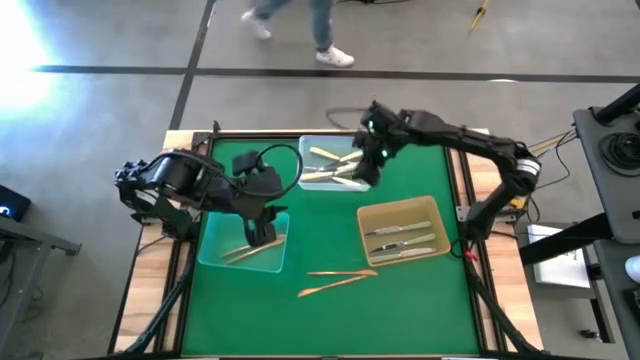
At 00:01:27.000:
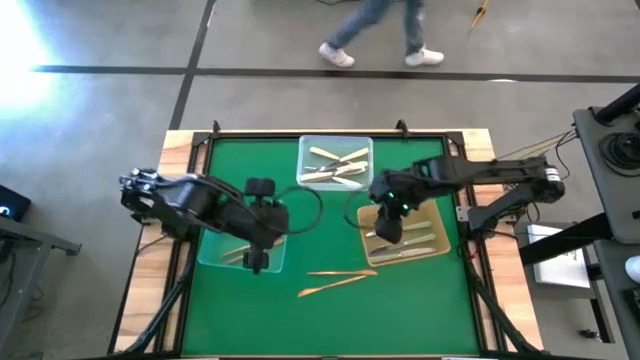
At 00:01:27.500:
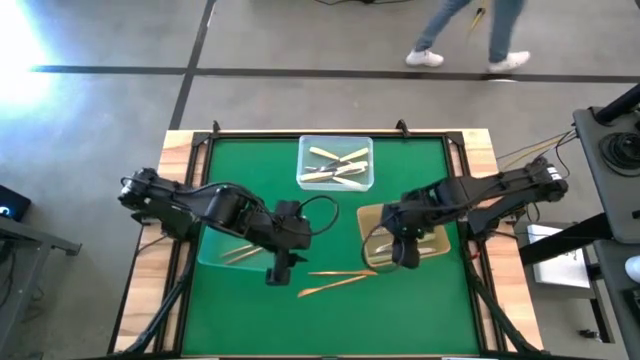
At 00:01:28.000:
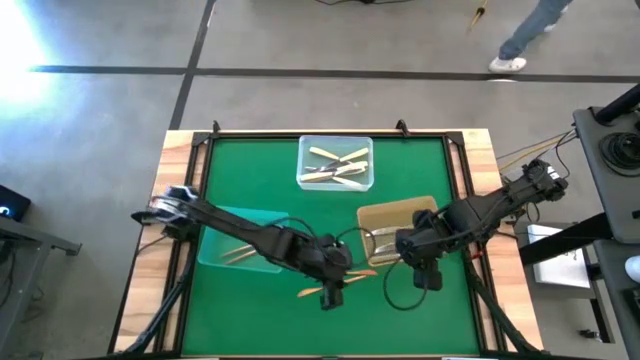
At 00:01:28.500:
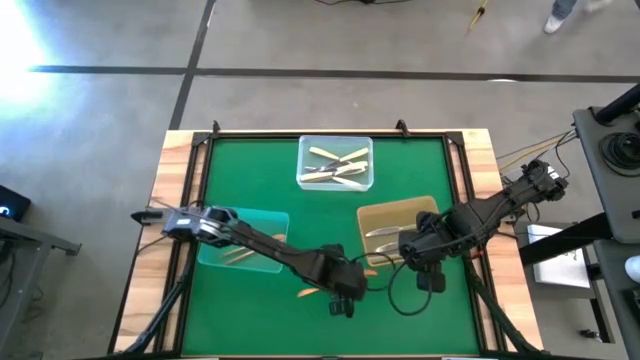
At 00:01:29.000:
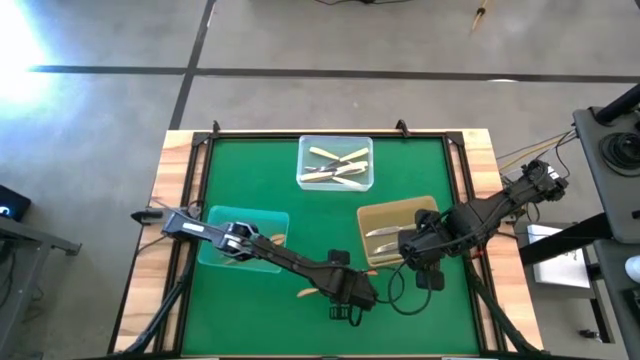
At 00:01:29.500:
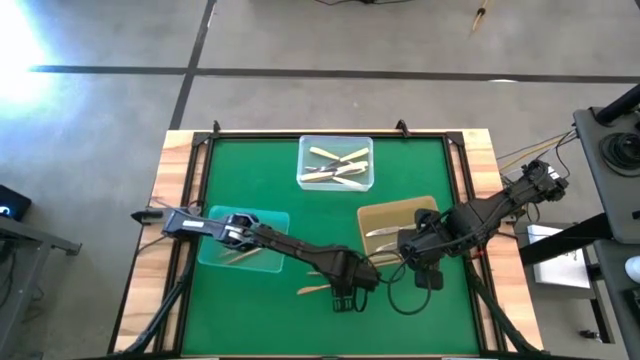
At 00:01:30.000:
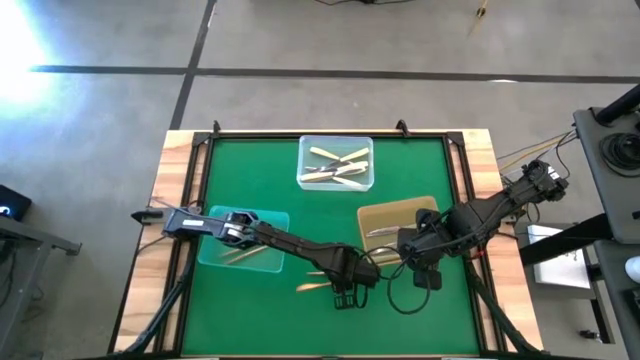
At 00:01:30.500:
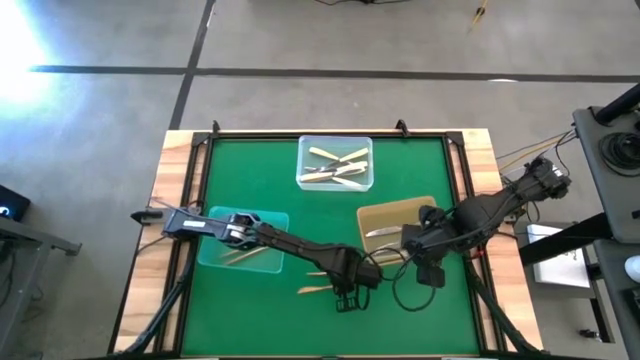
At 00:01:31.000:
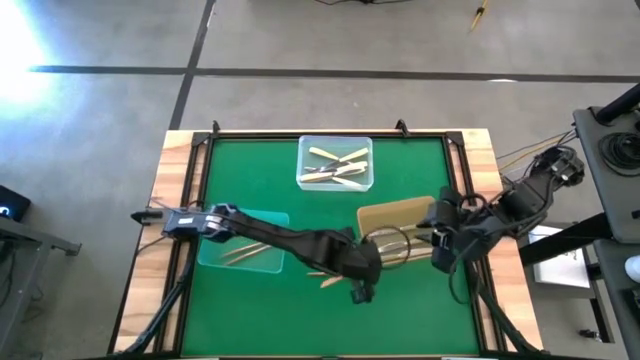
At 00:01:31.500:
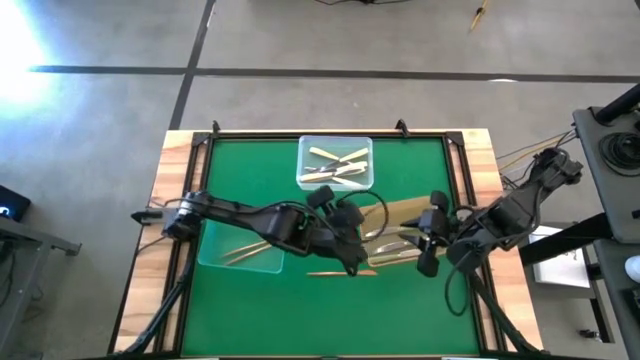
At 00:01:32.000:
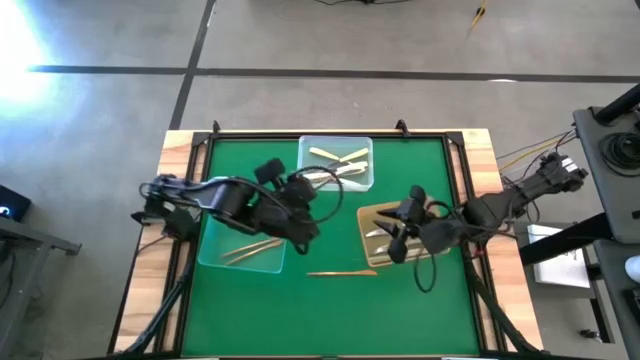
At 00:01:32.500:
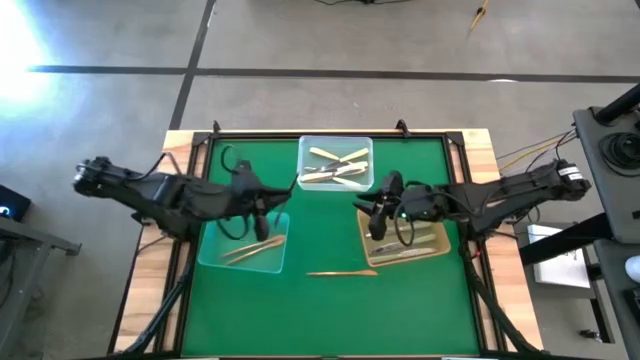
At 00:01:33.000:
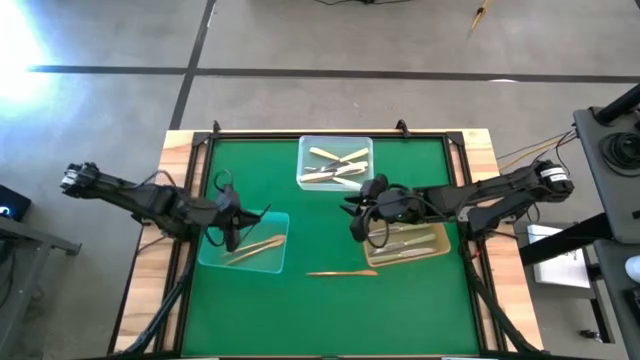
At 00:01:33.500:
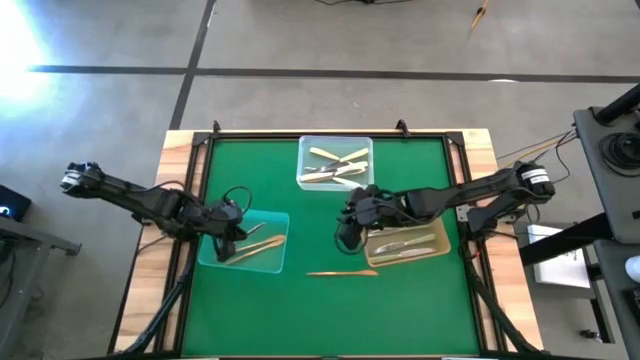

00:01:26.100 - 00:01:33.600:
Task: Sort silverware by color (type)
Put the gold knife into the blue bin

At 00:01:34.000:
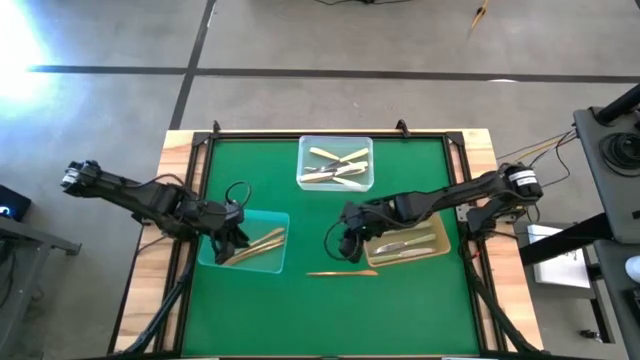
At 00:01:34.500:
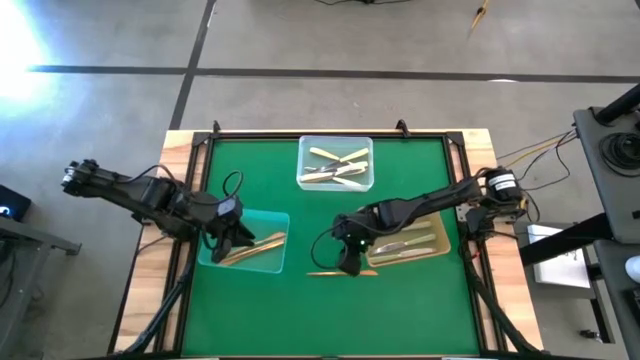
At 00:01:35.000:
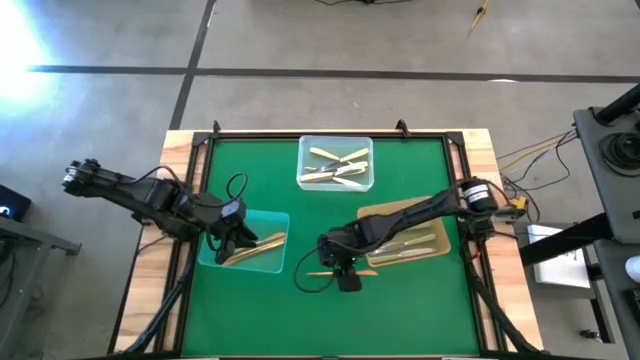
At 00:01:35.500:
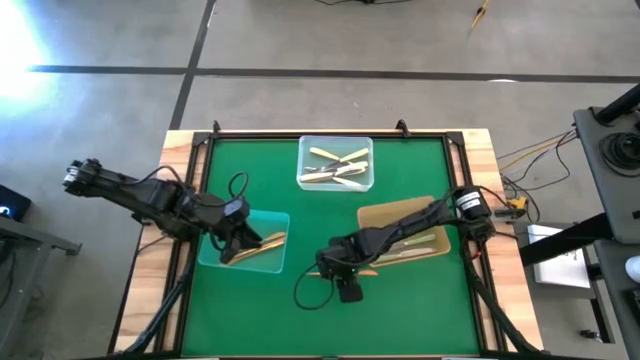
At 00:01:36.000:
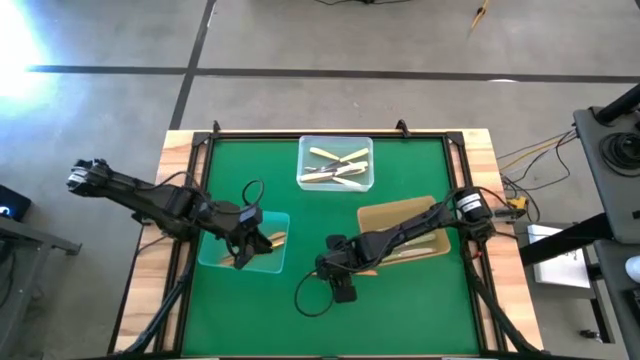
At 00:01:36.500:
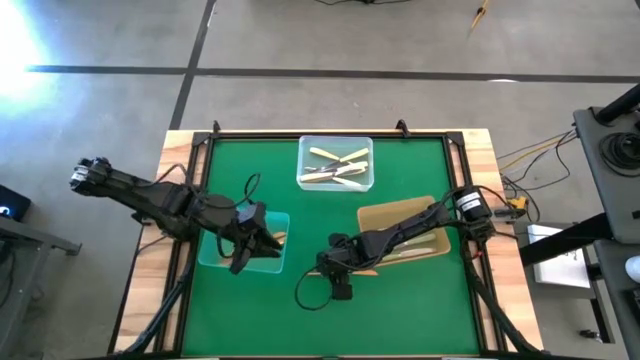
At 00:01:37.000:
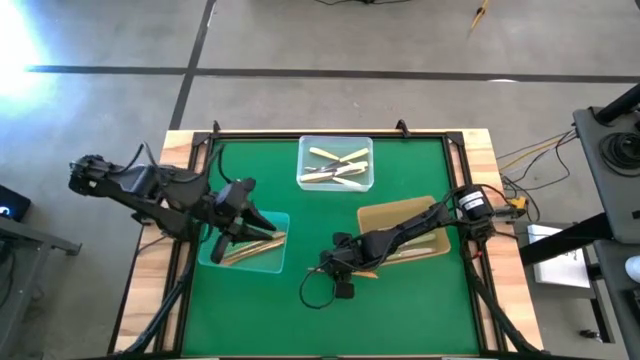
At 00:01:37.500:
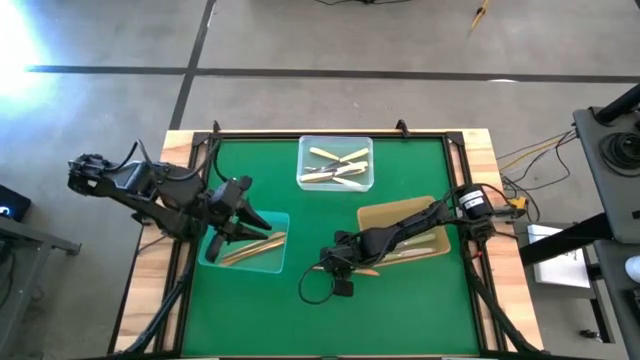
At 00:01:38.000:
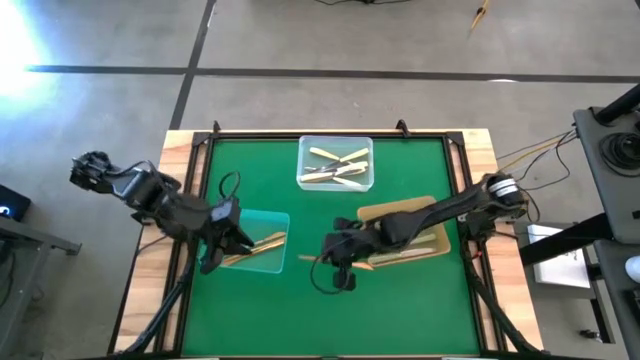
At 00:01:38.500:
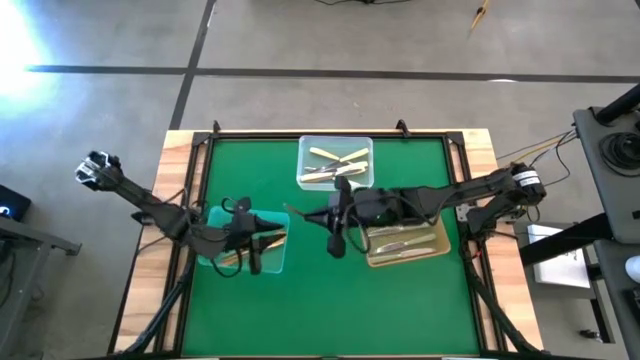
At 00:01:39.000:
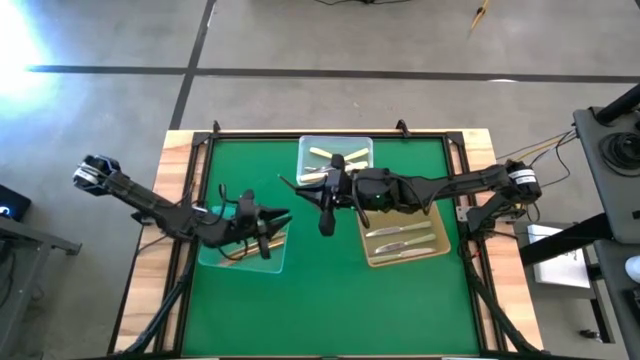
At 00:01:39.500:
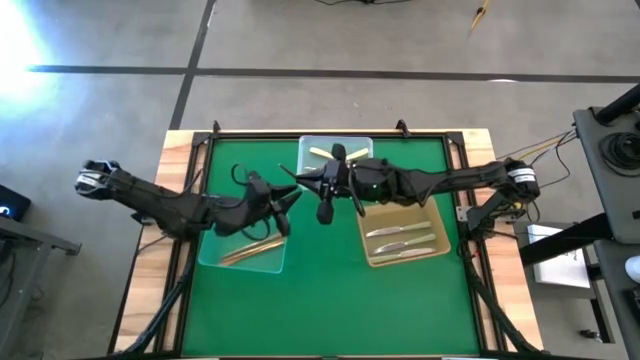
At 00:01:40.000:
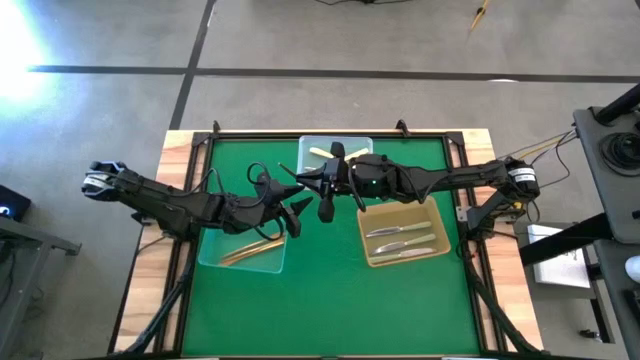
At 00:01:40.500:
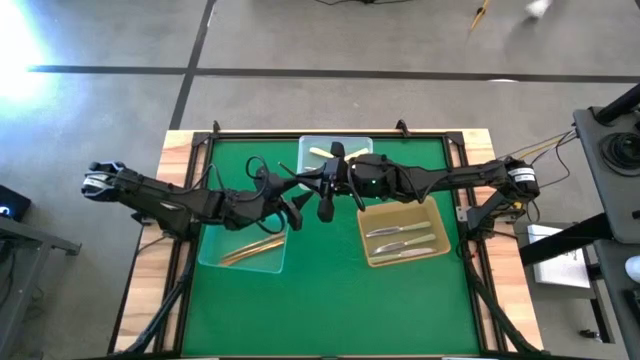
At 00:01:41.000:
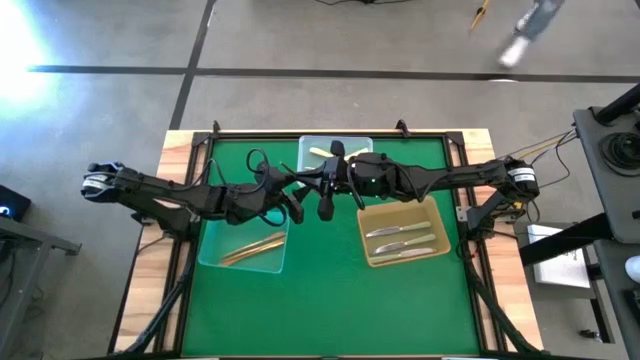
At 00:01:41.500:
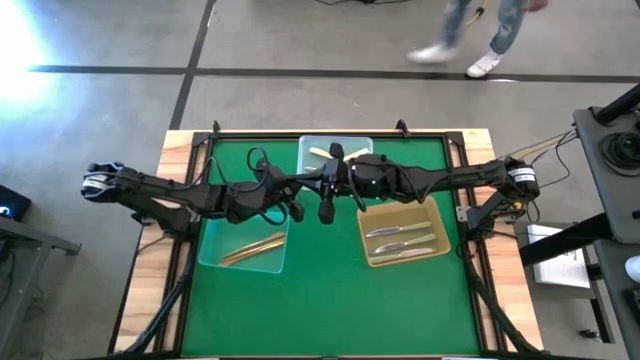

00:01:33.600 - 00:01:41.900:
Put the gold knife into the blue bin

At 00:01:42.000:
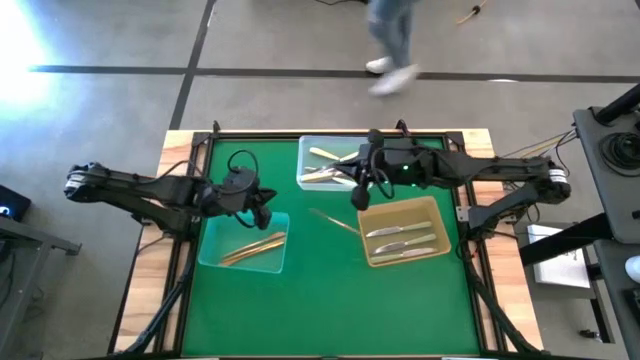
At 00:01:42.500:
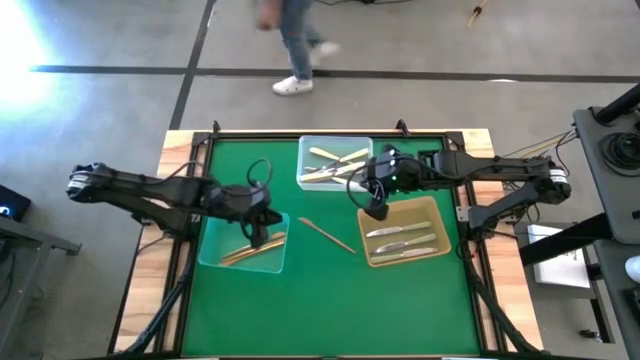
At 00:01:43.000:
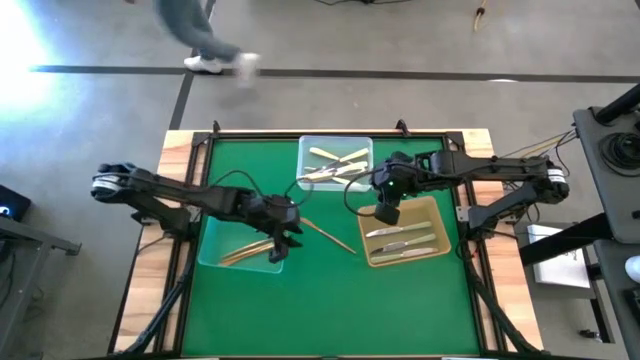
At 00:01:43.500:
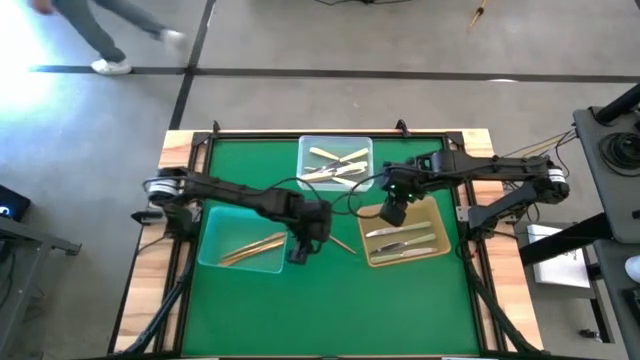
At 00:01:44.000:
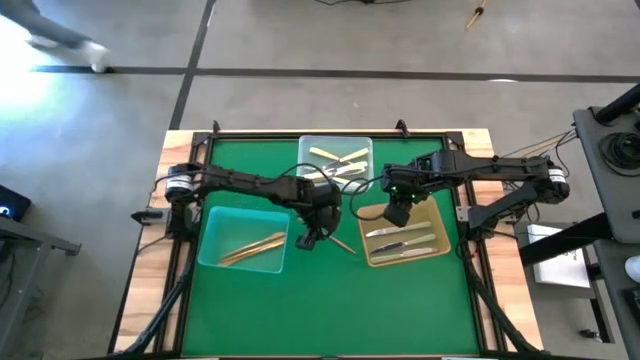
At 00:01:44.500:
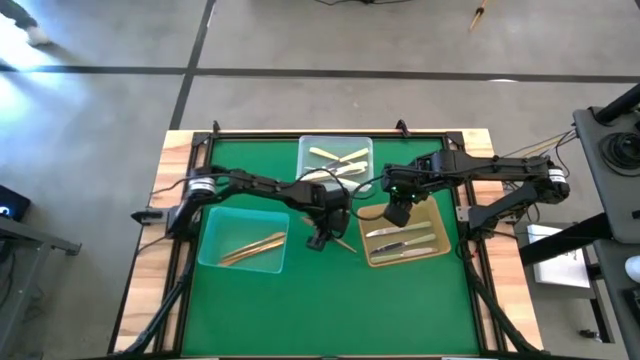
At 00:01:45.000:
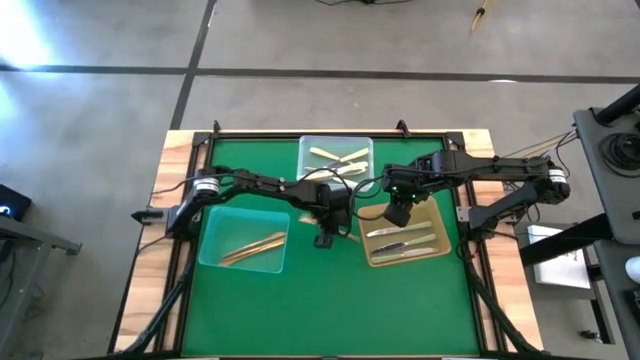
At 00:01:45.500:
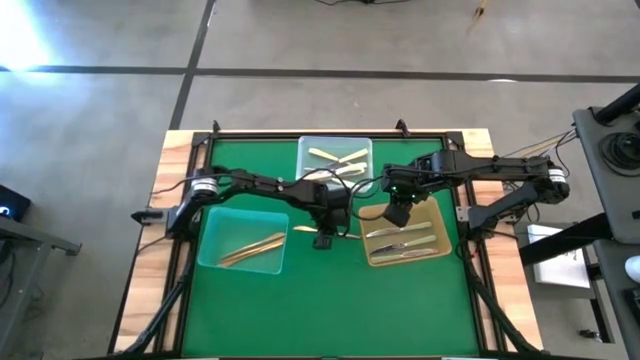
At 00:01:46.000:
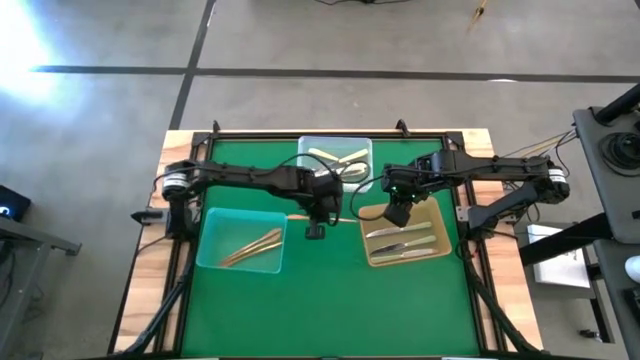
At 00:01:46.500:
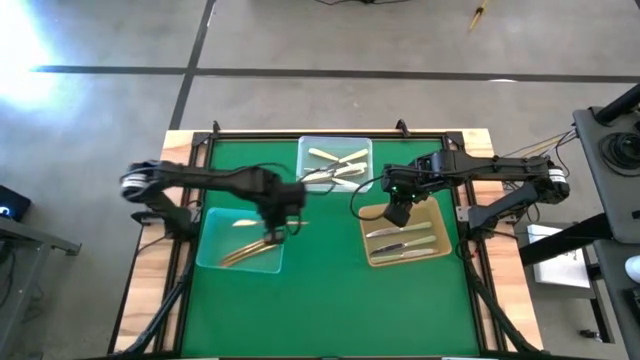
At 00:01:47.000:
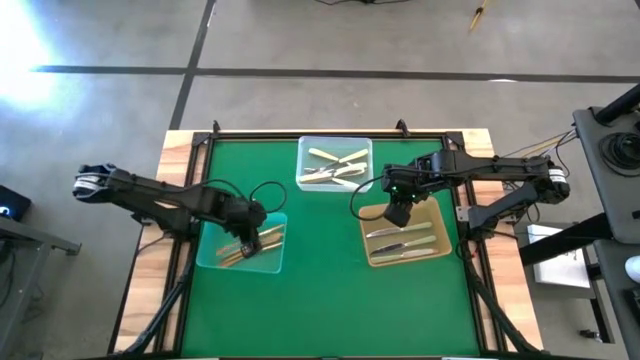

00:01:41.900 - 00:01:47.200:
Put the gold knife into the blue bin
